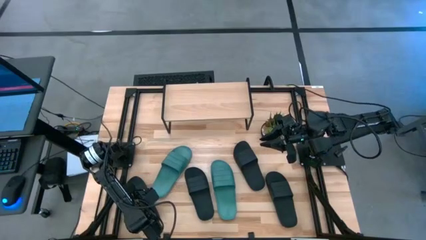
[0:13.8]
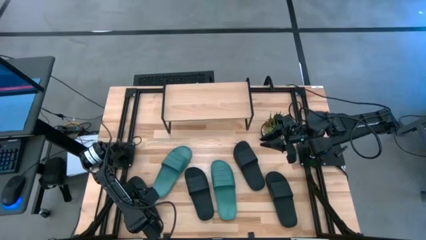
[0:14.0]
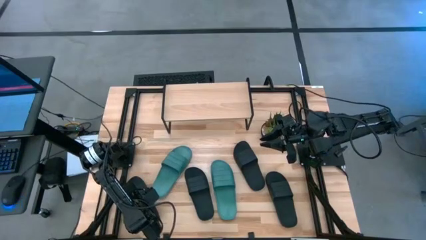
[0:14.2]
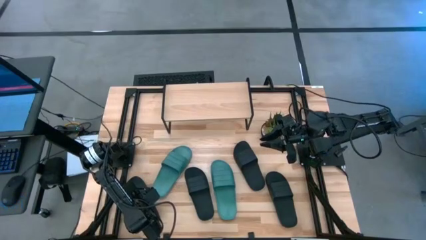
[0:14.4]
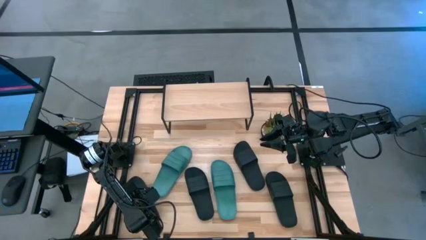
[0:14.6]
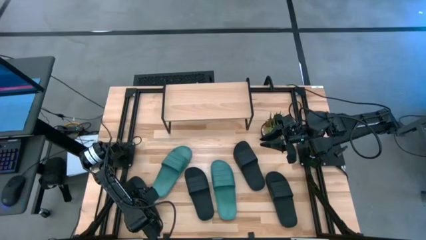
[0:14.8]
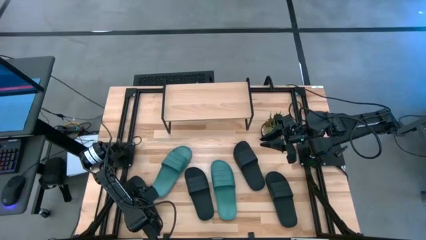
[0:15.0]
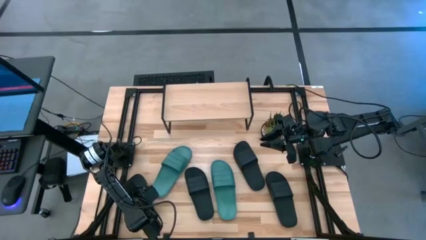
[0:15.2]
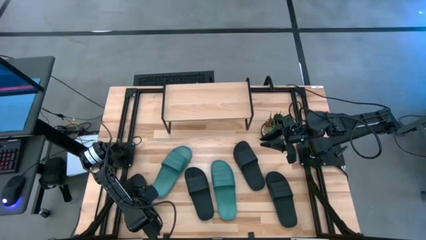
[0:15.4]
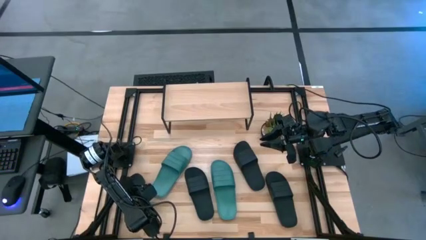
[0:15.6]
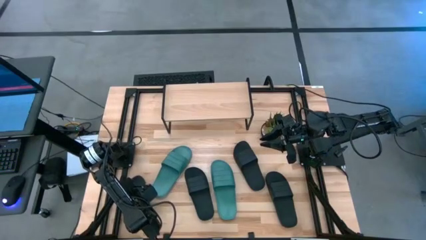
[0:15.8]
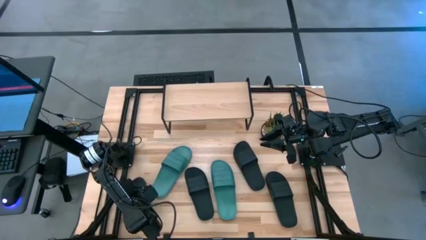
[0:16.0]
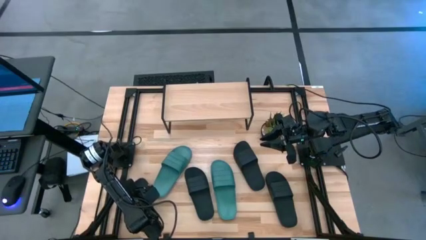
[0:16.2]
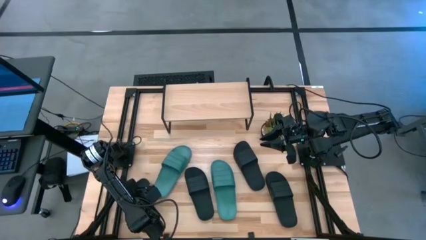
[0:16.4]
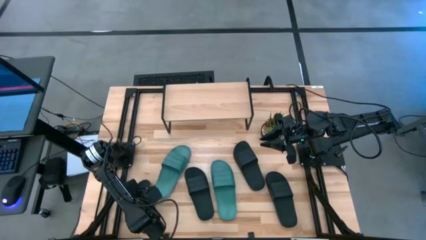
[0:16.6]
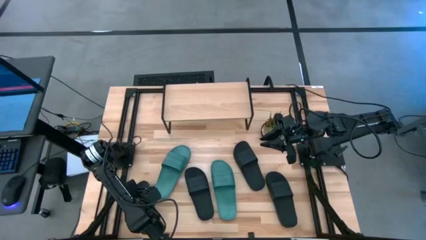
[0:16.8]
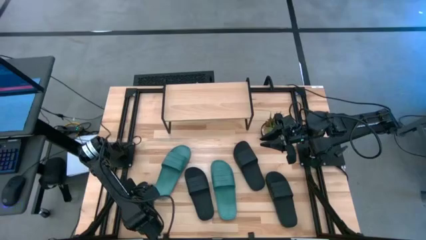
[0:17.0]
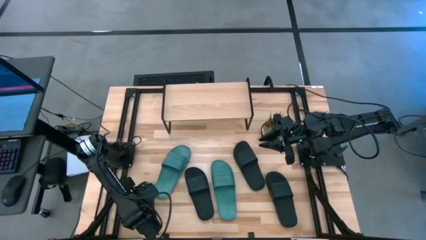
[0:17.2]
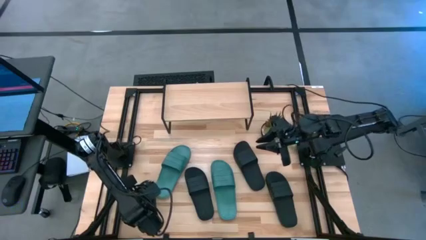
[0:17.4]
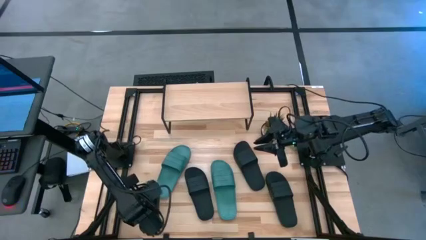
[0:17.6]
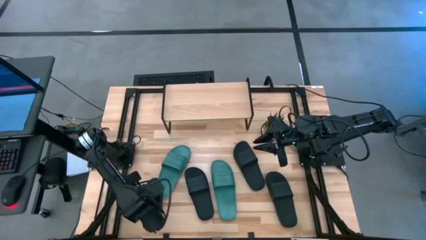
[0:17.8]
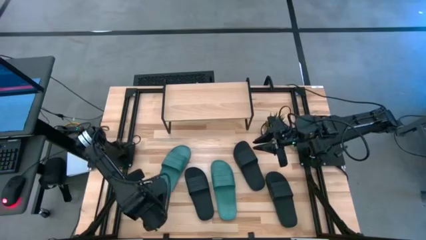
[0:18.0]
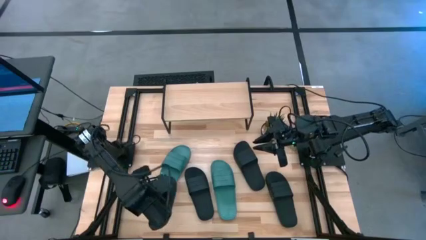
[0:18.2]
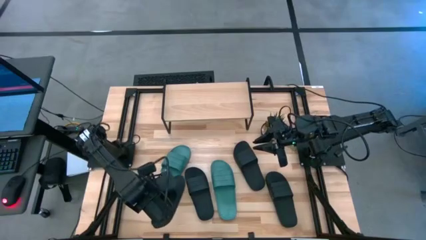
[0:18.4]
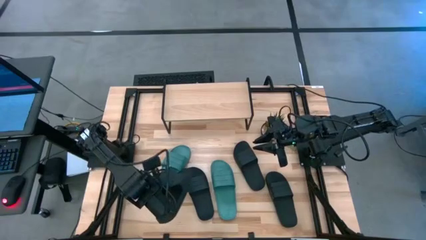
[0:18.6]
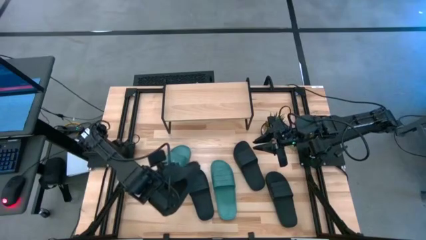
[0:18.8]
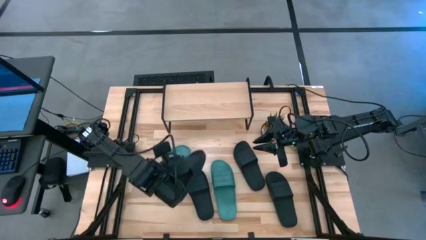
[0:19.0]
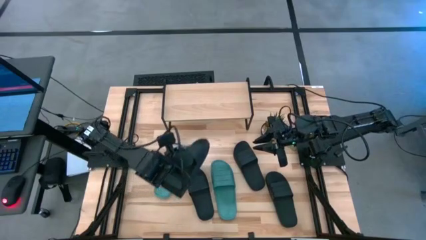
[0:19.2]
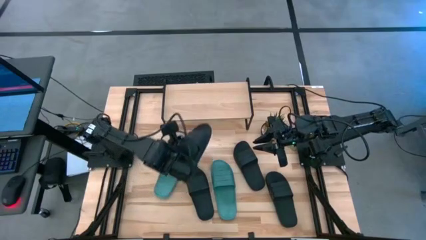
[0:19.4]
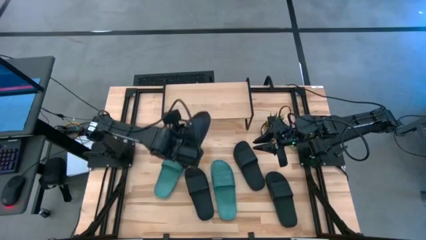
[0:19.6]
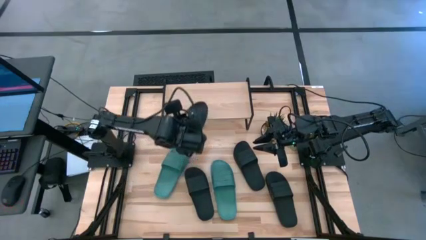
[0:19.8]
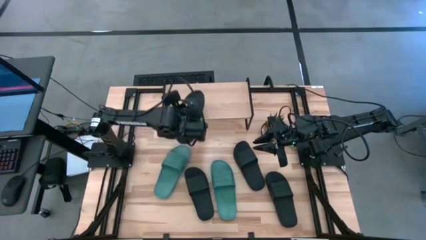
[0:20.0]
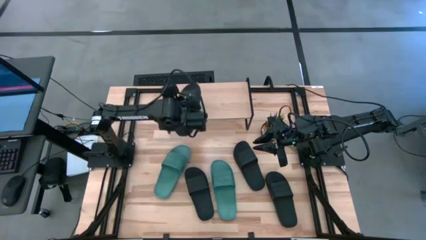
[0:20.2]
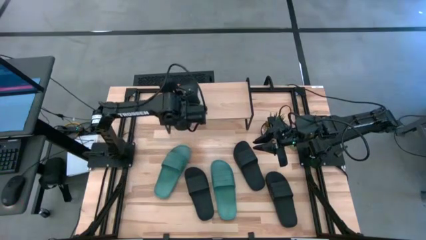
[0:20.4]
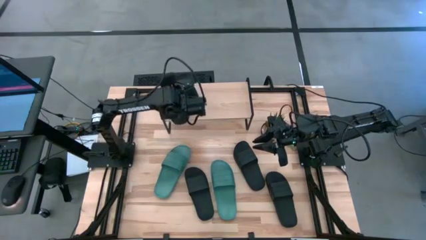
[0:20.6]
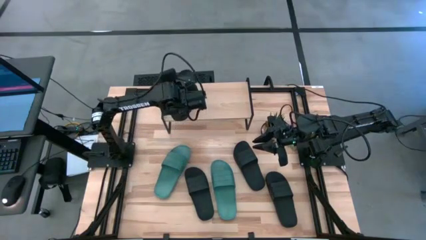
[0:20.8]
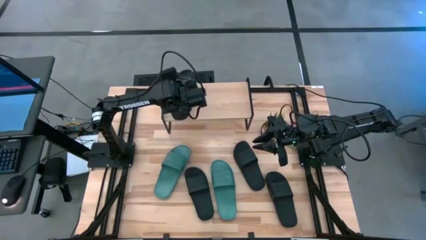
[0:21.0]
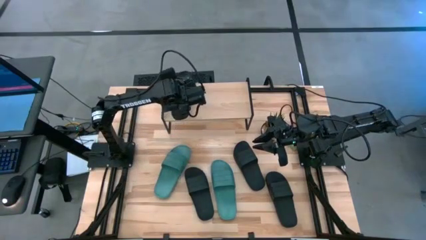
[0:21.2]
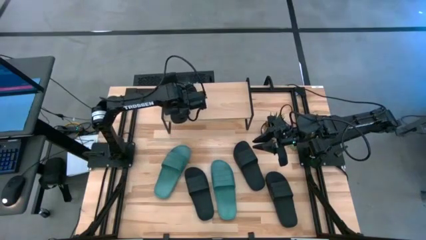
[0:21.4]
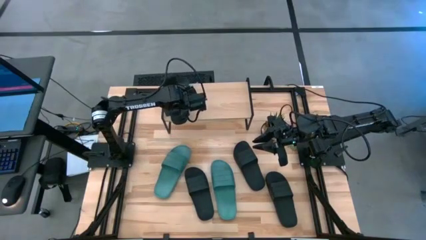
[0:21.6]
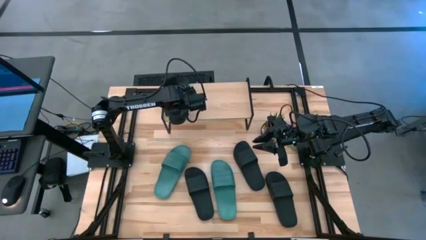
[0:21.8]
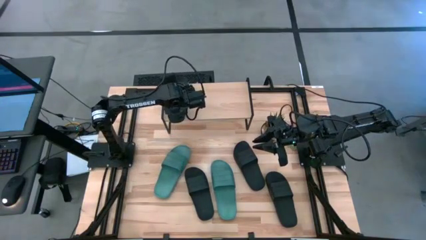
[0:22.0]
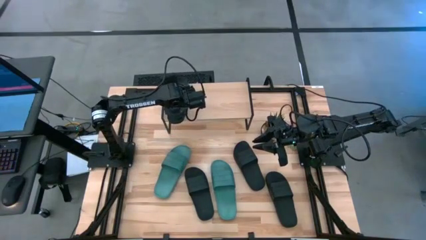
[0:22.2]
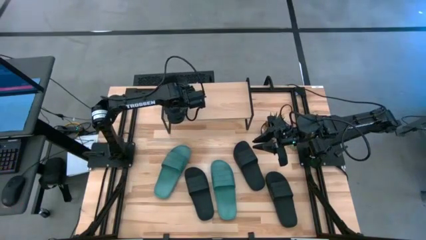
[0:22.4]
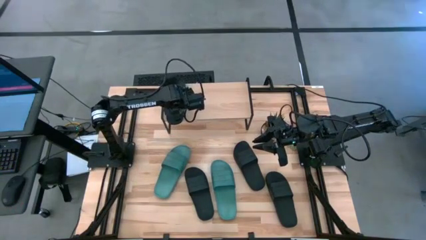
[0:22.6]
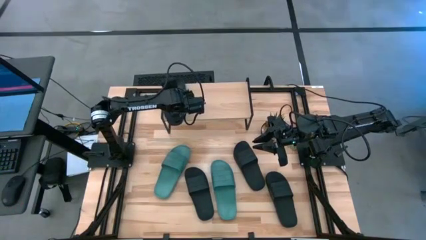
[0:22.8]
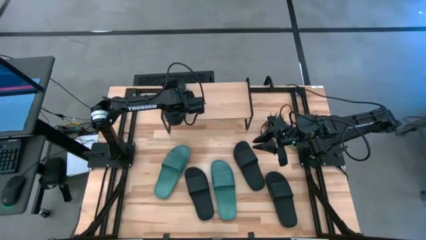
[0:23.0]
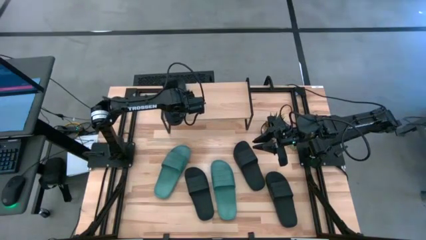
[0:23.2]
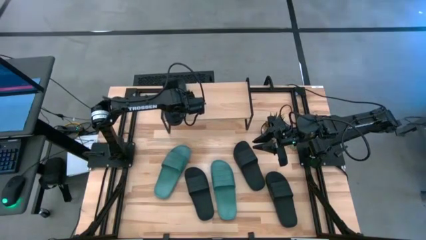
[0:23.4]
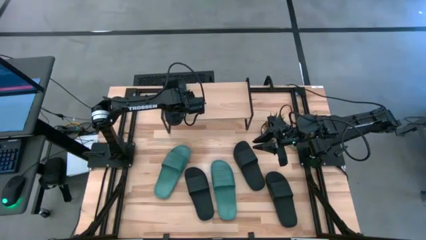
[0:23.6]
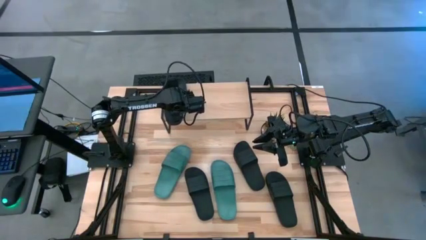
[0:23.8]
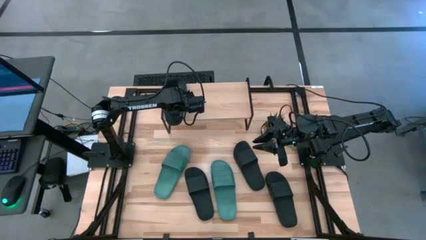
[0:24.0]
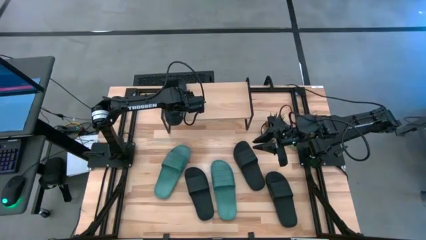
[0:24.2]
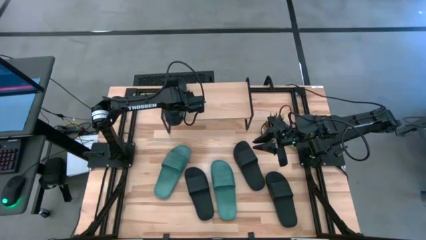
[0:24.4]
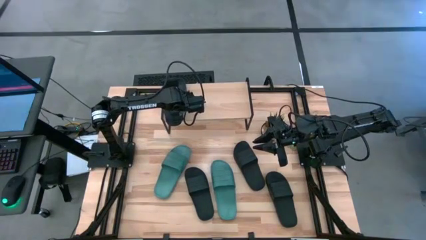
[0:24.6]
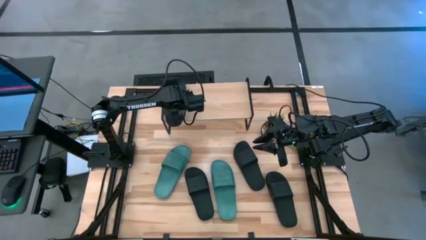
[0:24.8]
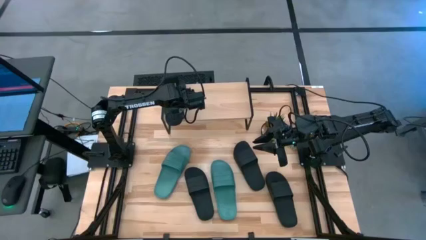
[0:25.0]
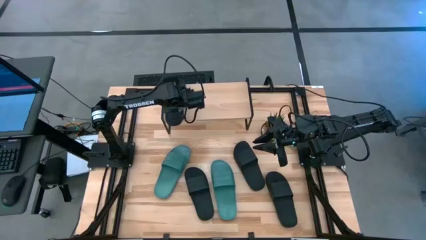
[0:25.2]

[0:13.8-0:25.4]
Task: Pick and place slides into the shelf
Put the black slide on the shelf

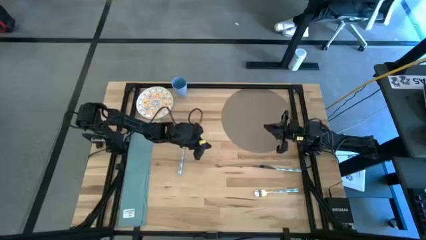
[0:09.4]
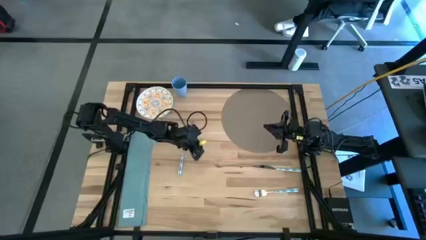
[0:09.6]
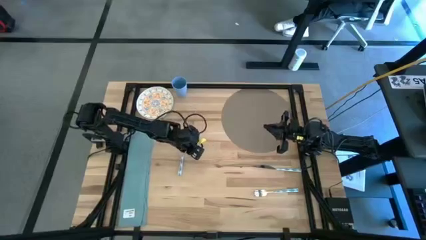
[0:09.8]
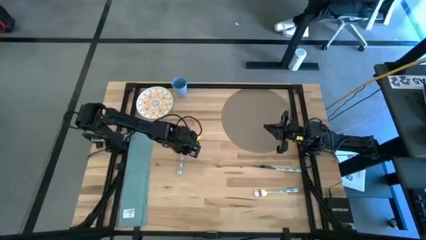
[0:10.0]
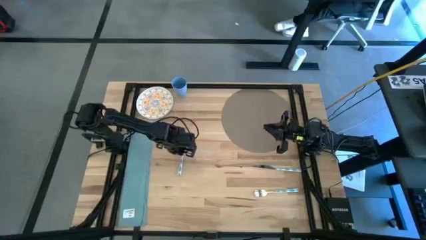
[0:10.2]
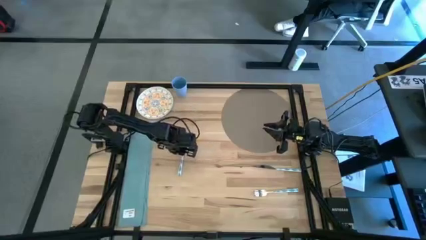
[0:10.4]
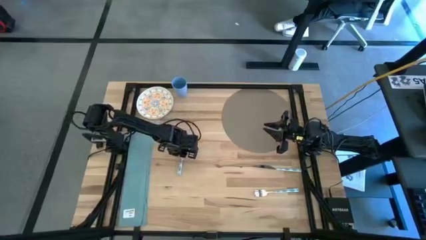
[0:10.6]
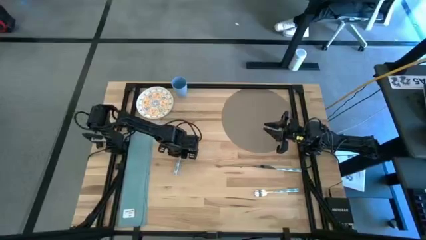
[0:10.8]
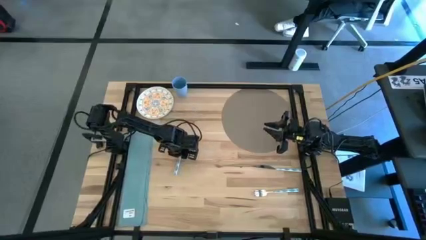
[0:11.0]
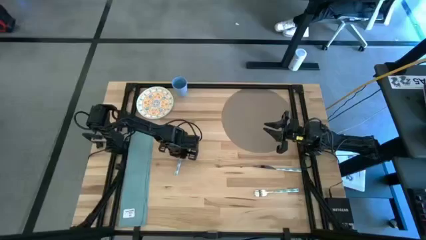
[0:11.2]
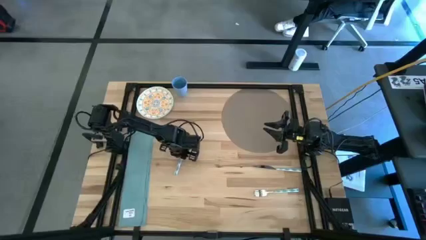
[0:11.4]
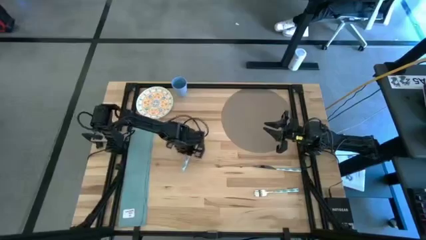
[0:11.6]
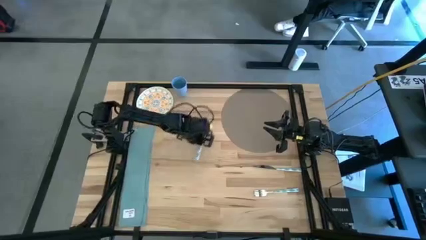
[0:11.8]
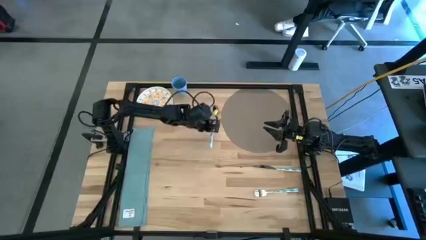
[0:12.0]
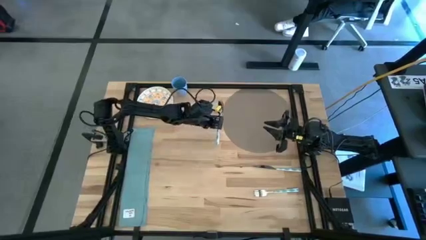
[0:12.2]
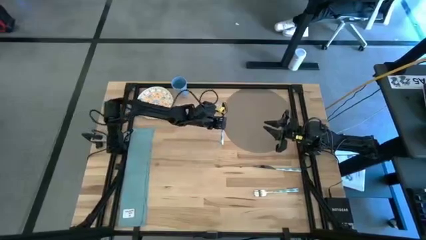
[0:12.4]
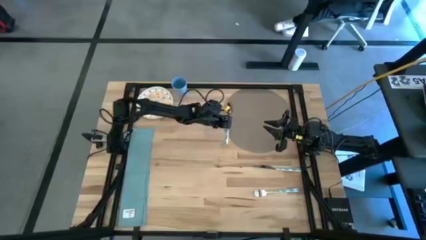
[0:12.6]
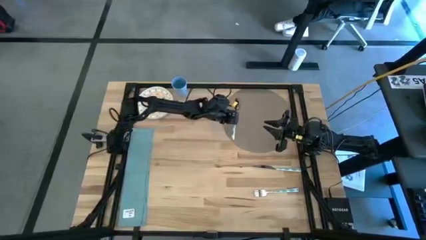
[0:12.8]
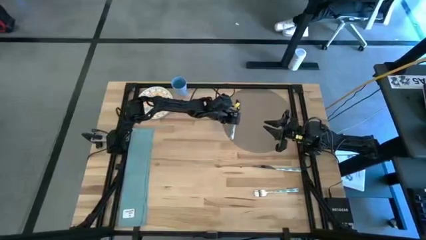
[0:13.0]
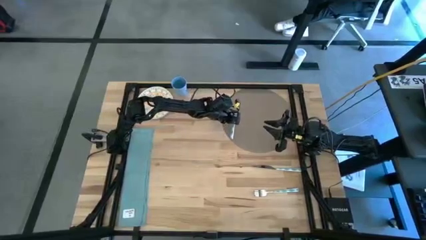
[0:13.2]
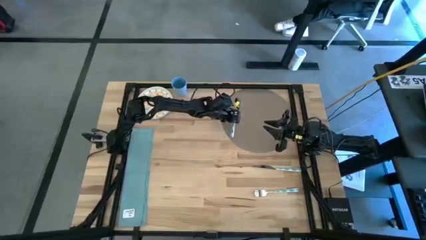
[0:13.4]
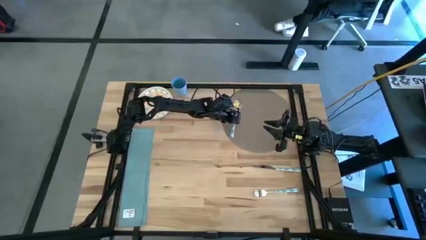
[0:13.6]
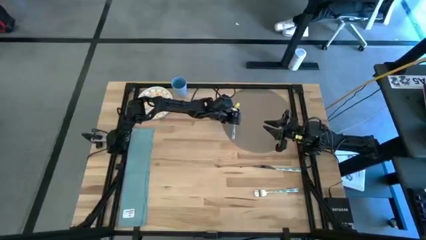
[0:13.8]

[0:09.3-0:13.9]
Task: Set table place
Put the blue spoon on the brown mat

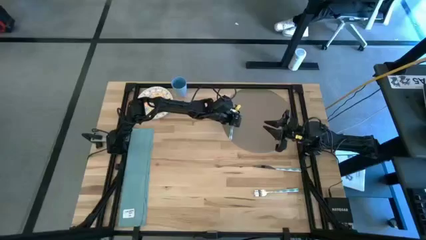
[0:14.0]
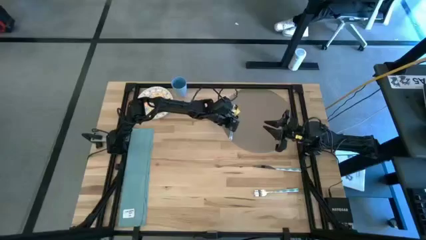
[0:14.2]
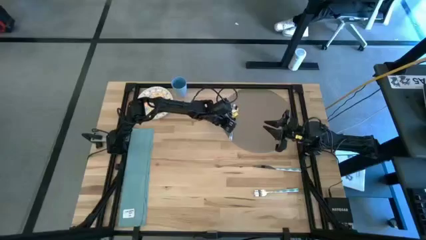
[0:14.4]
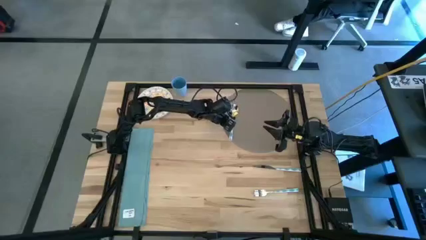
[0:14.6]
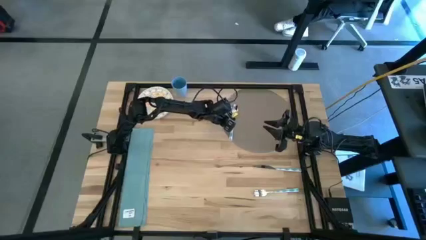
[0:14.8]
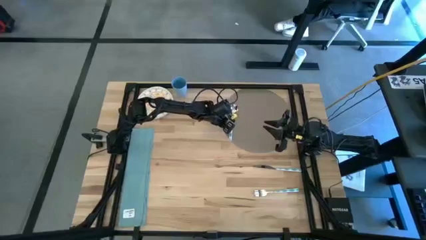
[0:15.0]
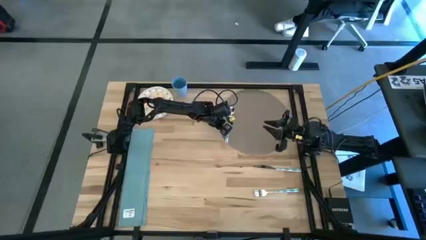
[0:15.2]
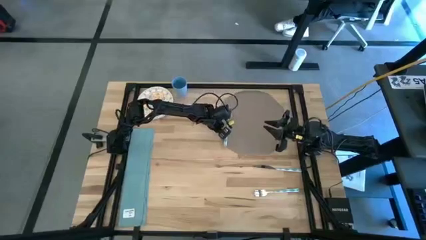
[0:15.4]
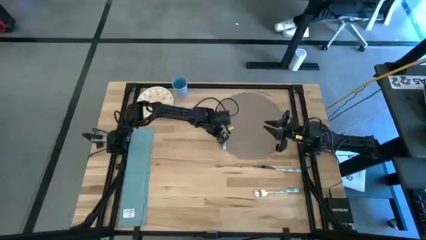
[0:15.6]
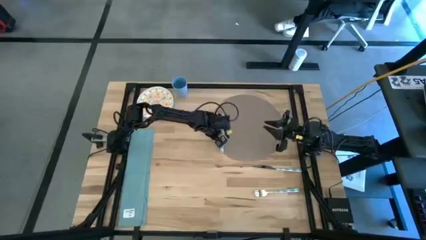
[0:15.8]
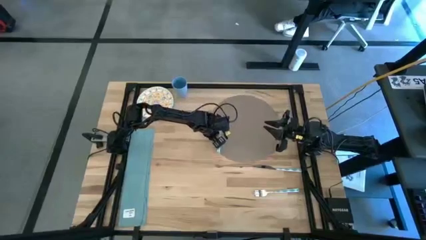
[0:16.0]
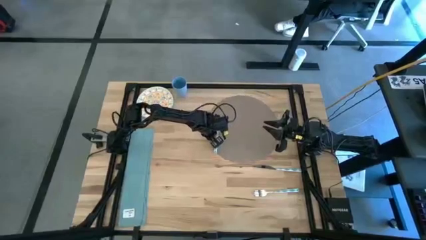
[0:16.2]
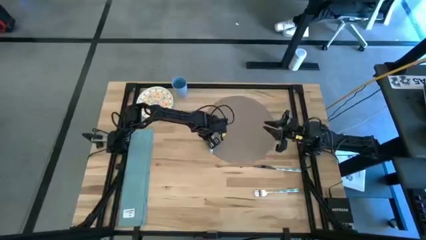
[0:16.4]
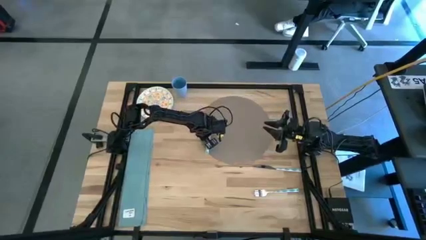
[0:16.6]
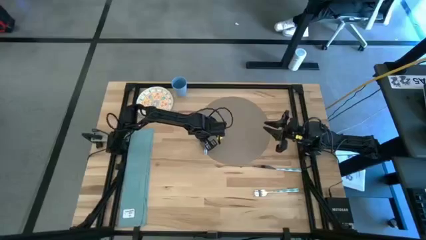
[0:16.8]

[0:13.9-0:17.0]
Adjust the brown mat
